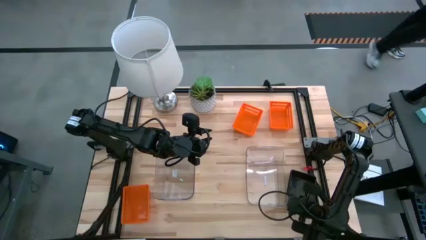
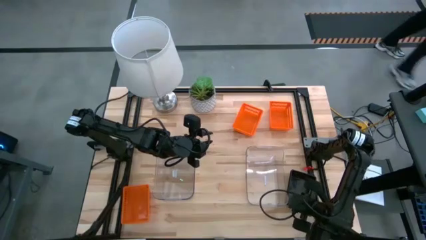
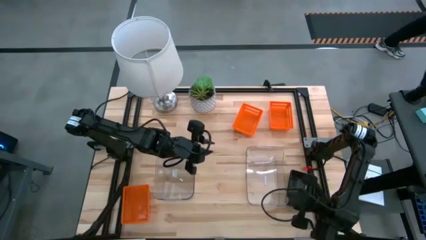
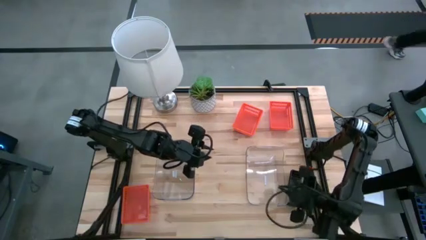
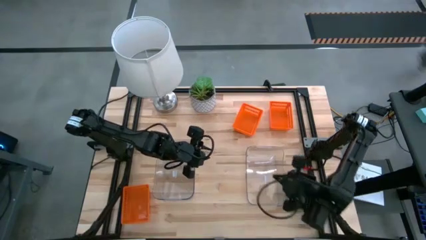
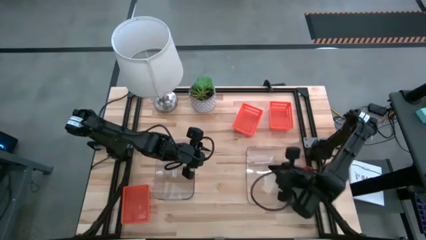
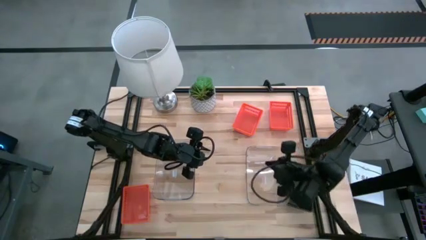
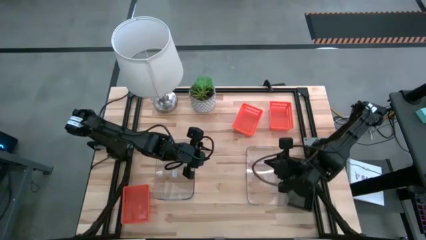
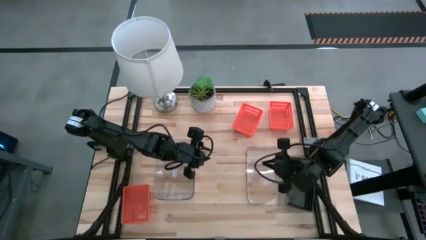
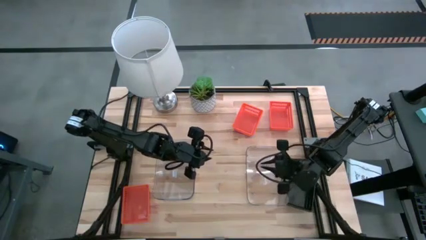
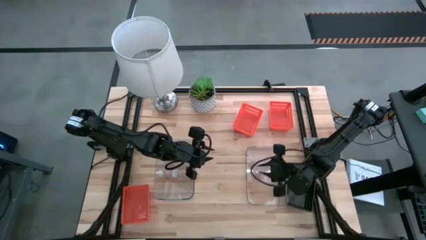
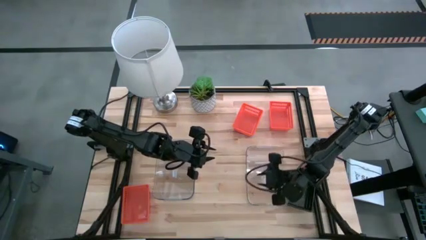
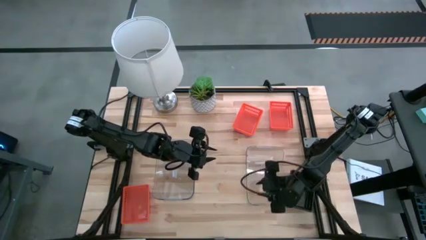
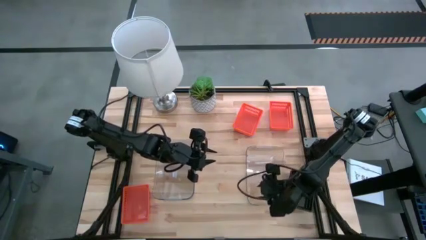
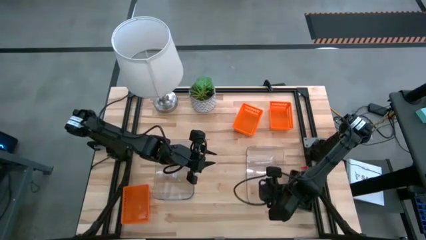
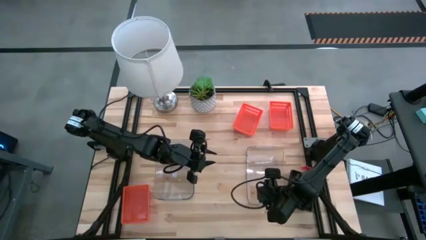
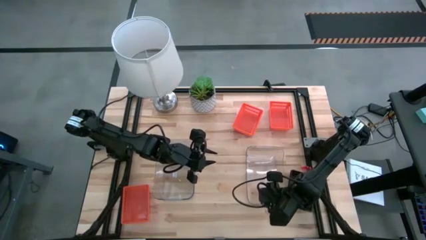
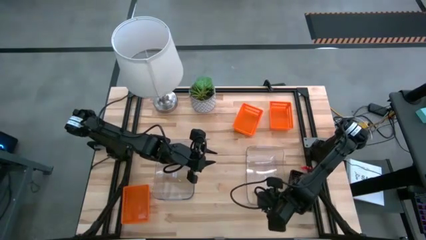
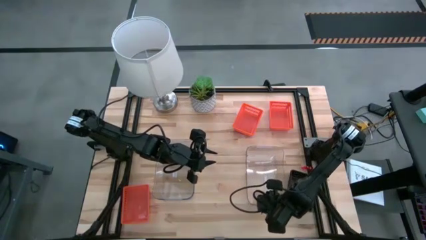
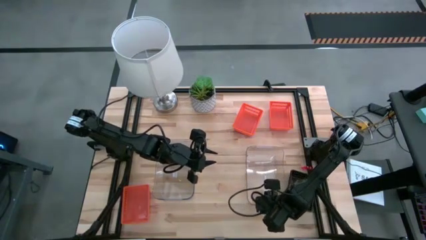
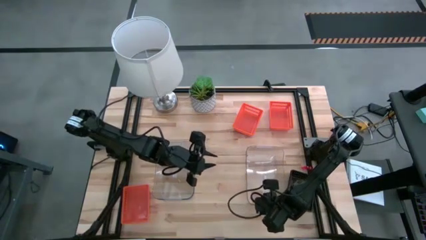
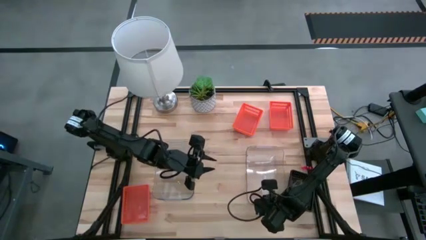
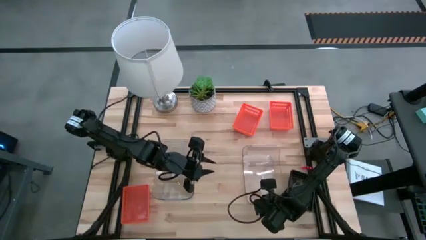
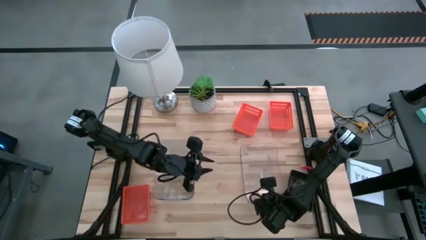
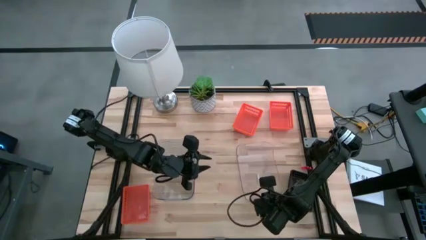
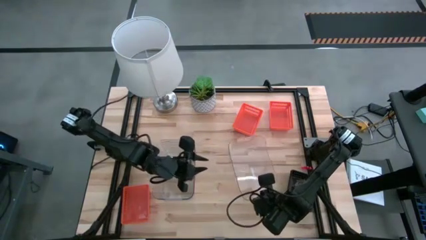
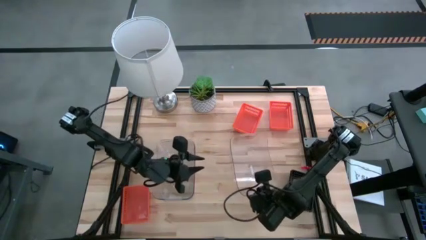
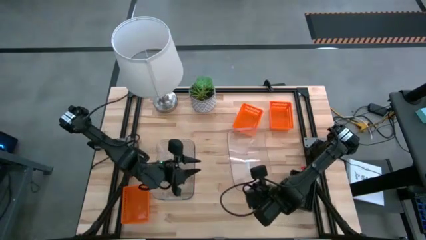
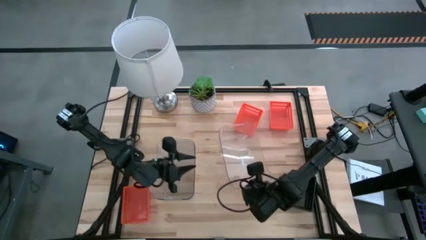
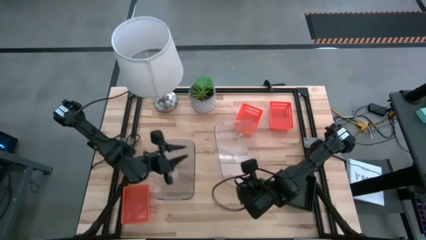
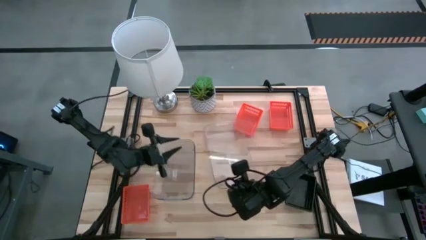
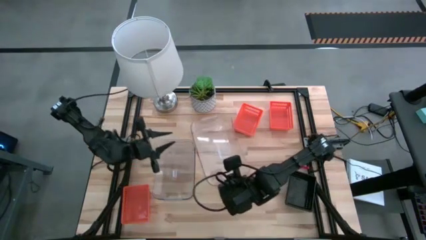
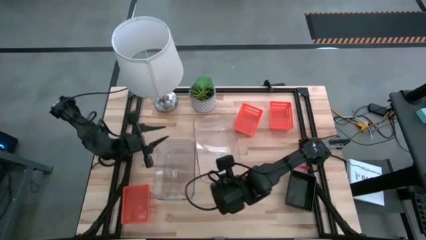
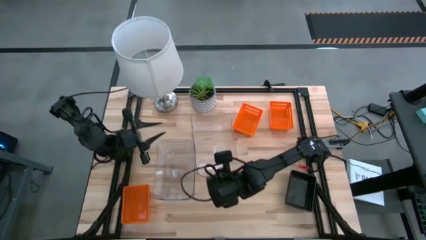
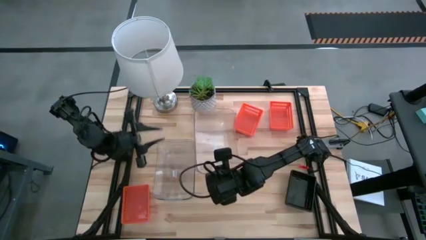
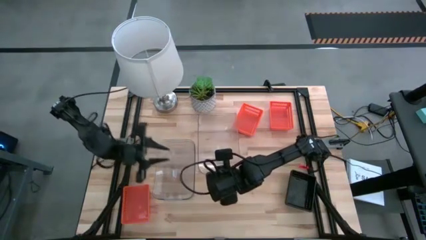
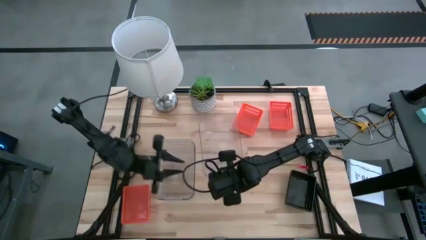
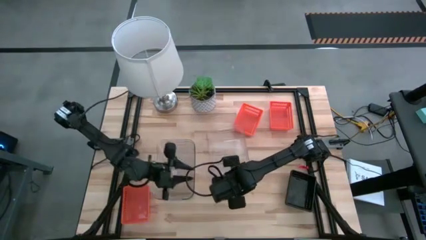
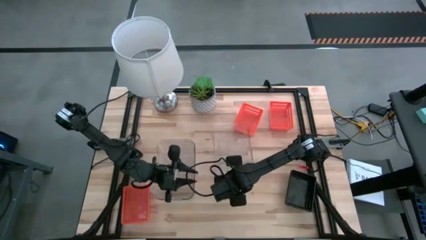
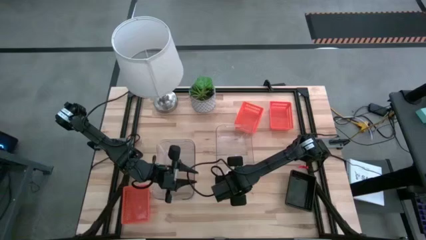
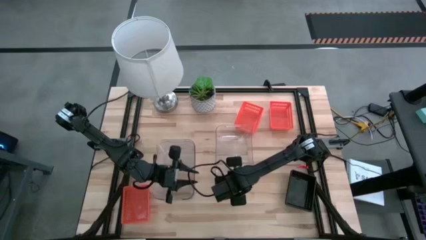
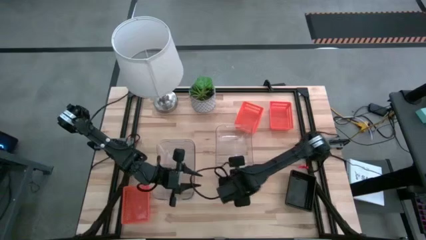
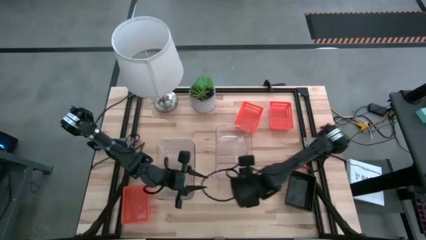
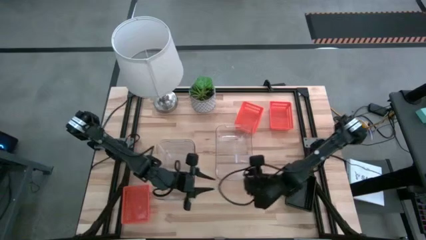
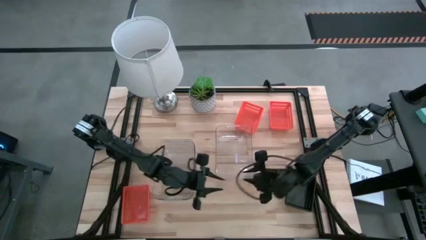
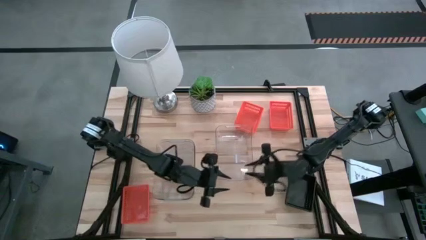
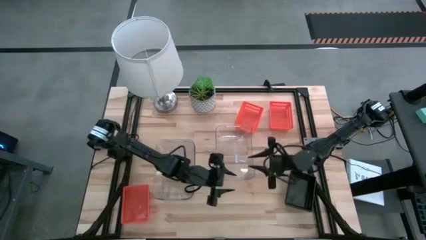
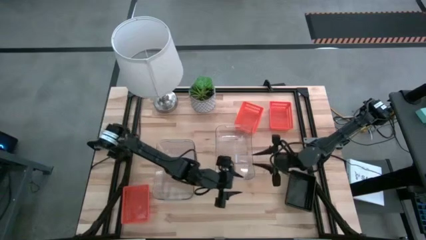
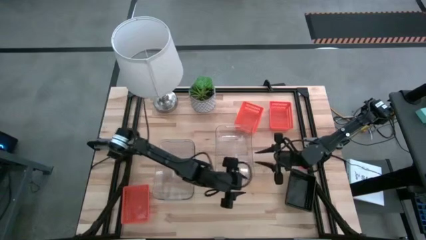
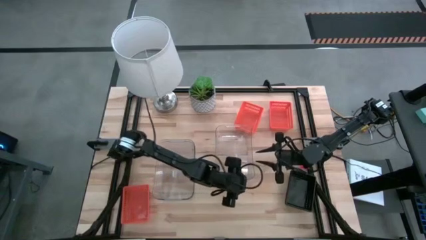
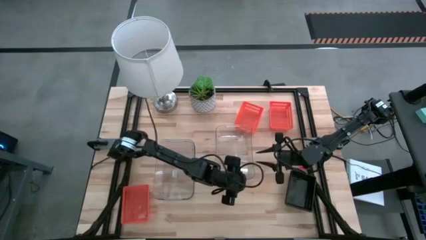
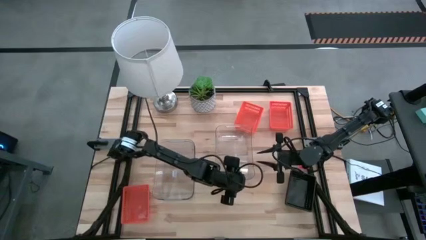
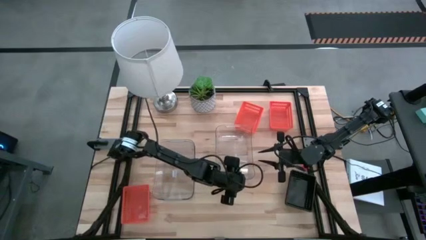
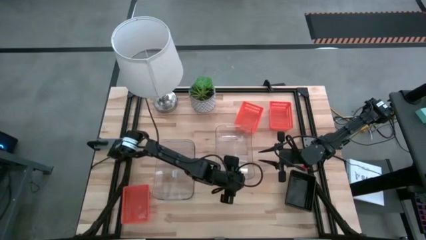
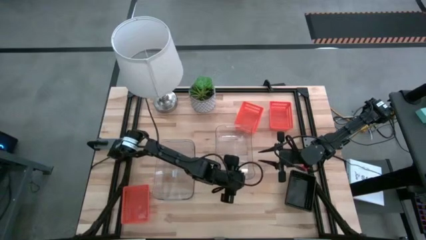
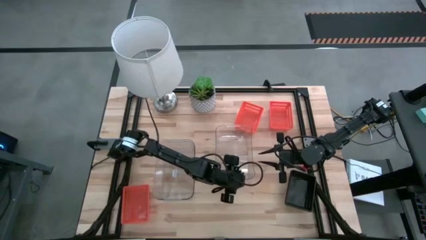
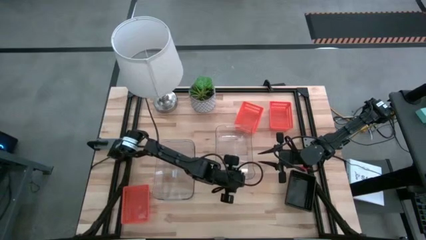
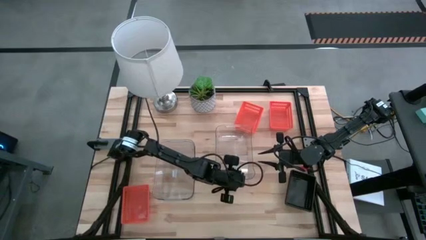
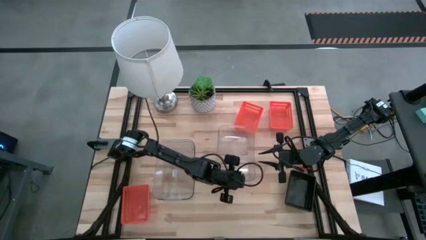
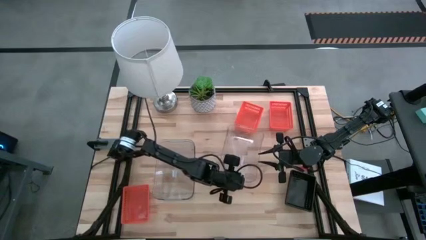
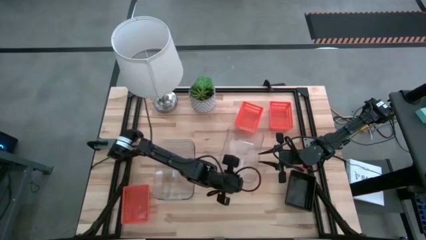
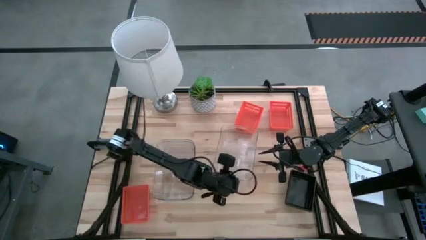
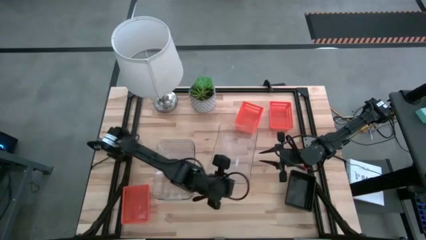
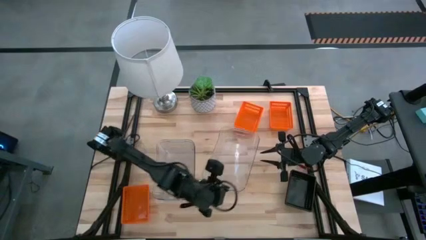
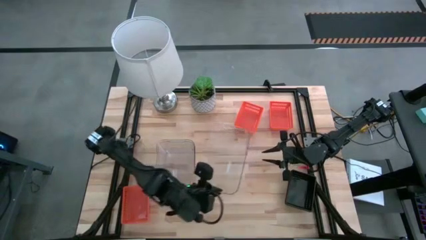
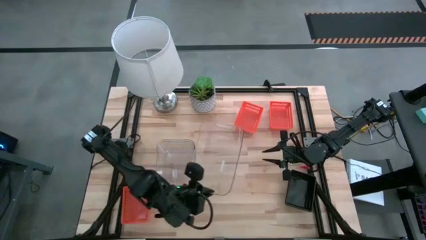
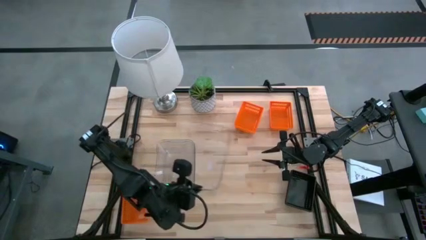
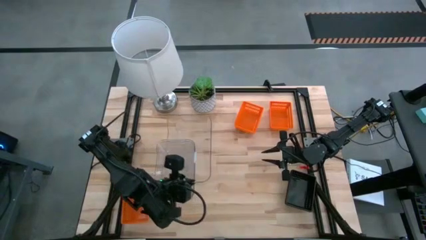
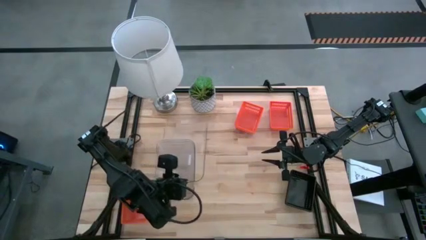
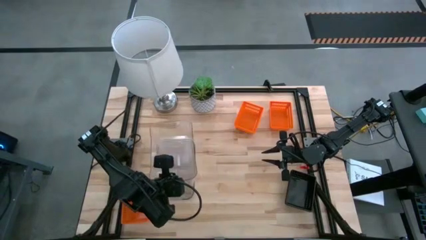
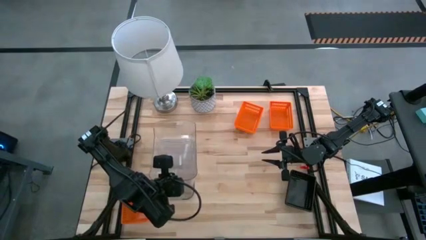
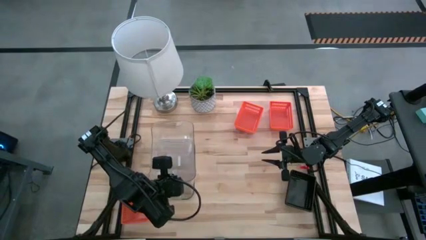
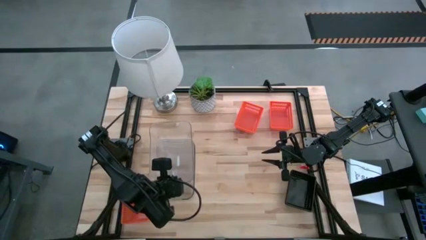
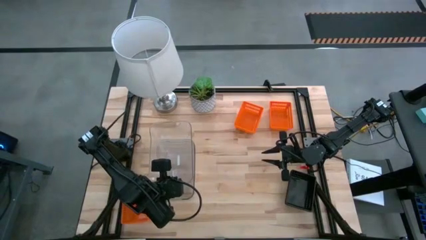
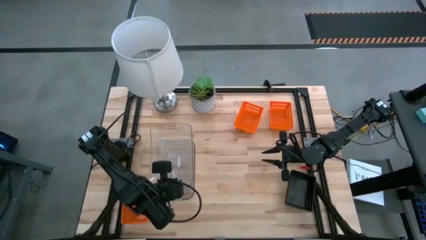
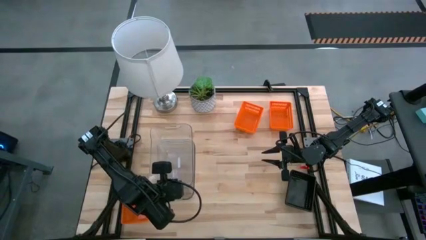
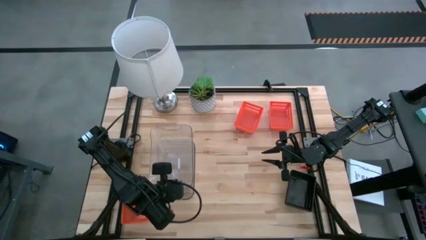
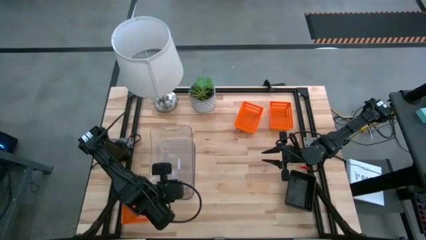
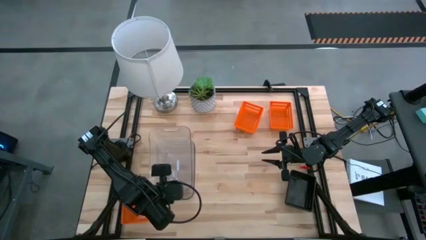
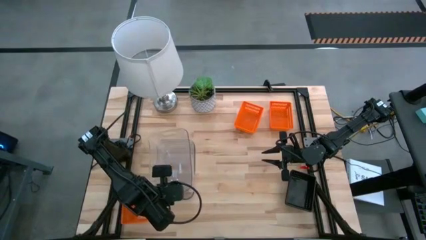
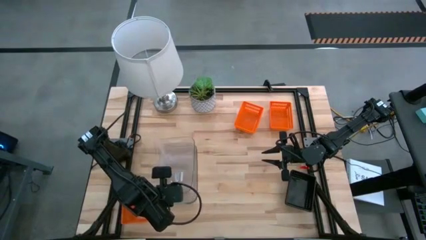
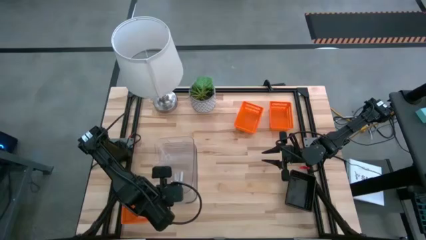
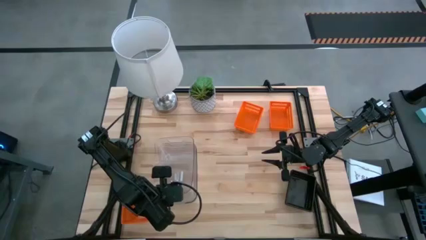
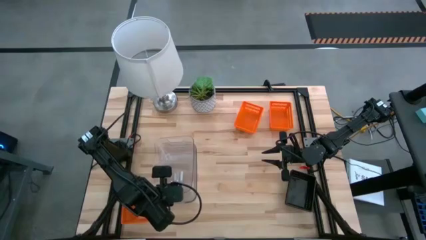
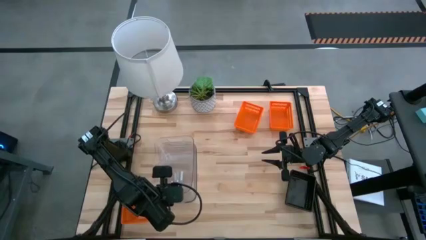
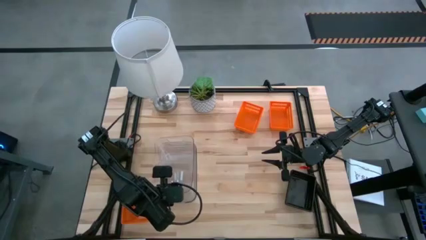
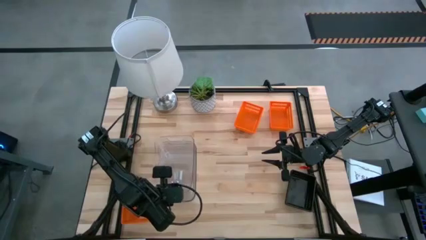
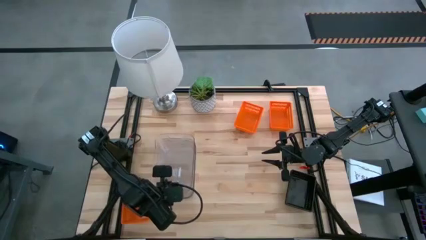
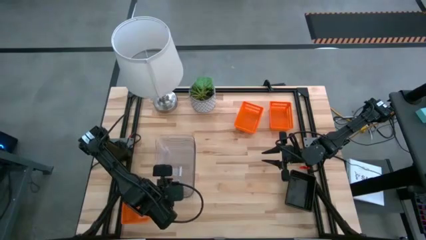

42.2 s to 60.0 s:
Stack the right transparent bin on the left stacked transparent bins
